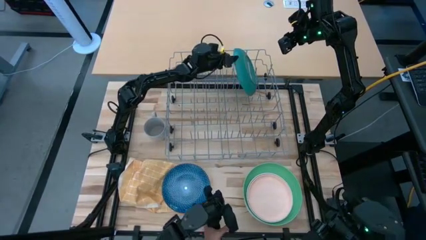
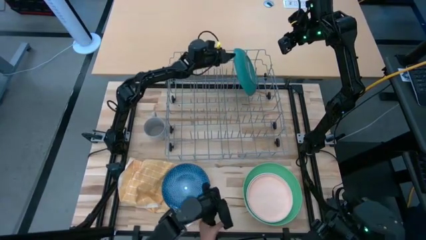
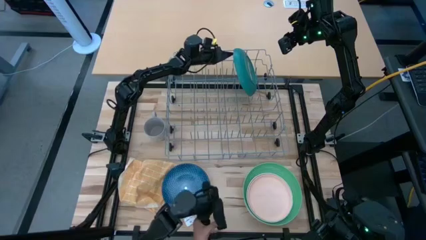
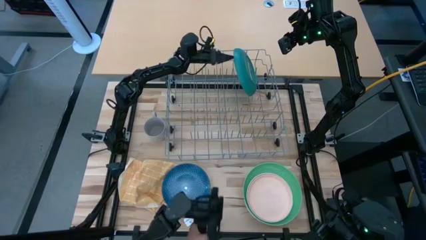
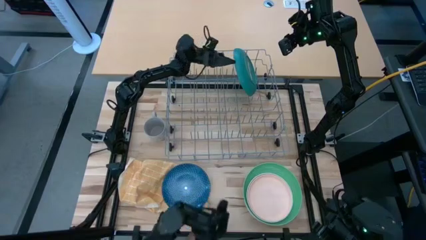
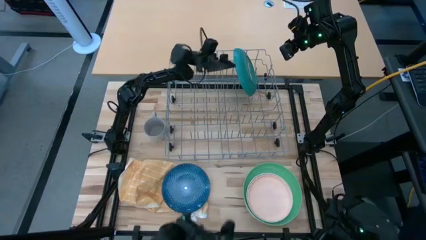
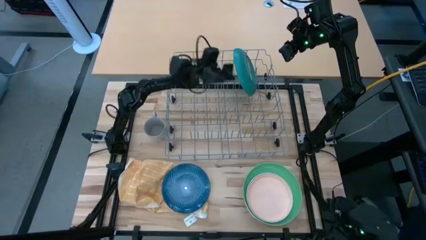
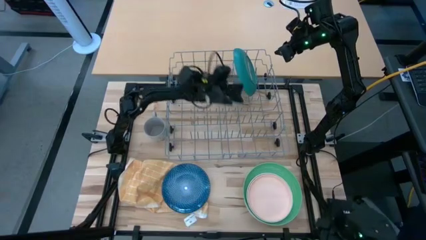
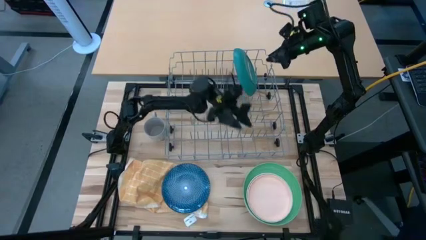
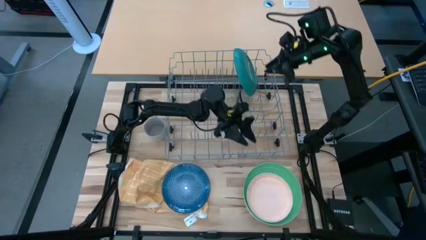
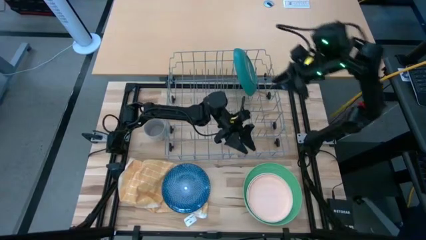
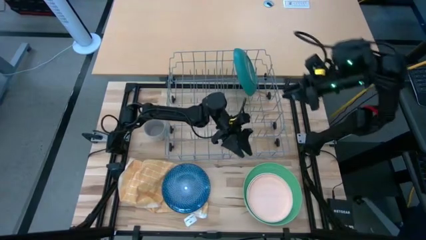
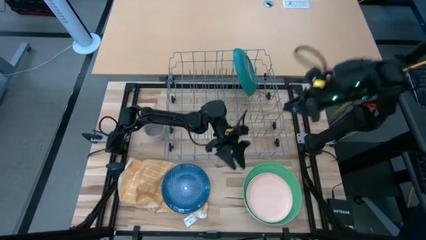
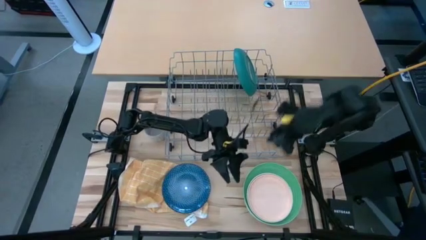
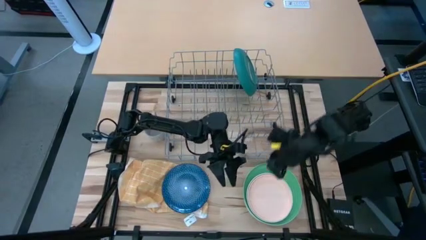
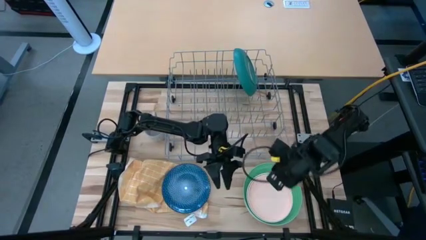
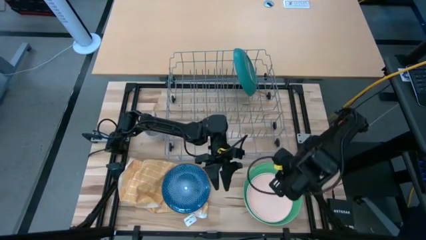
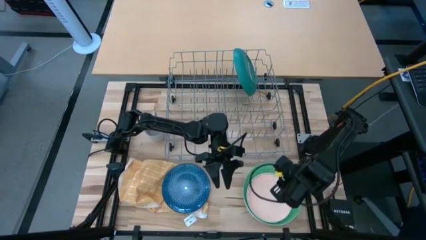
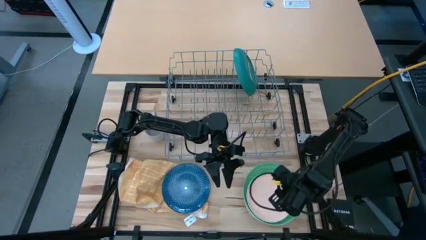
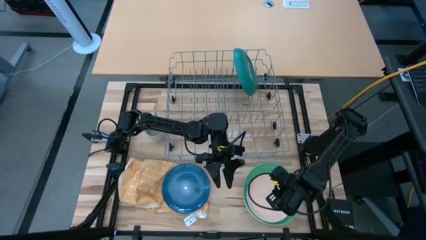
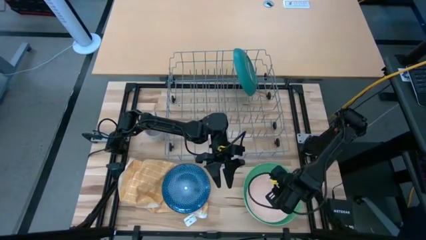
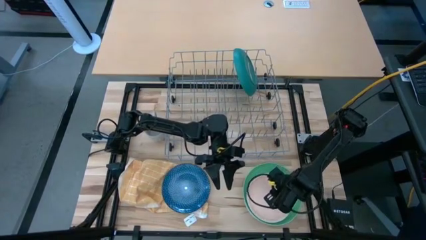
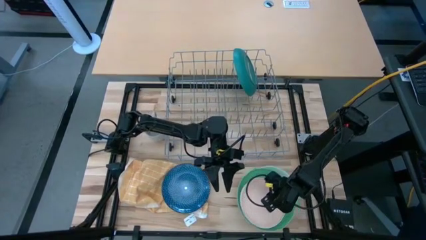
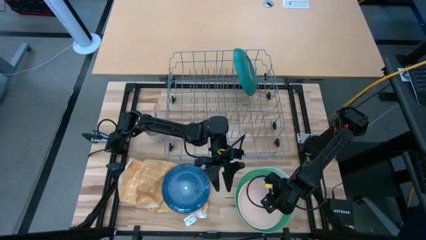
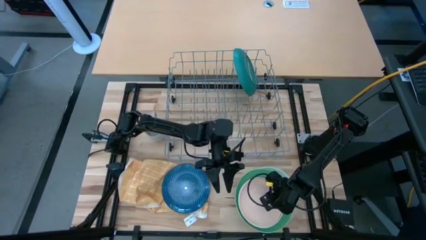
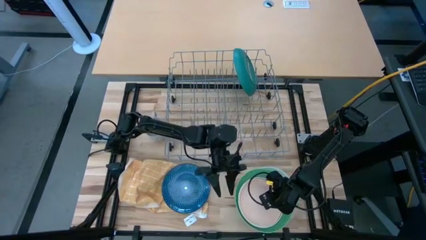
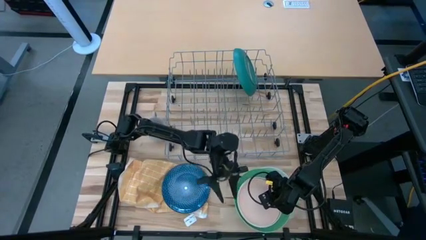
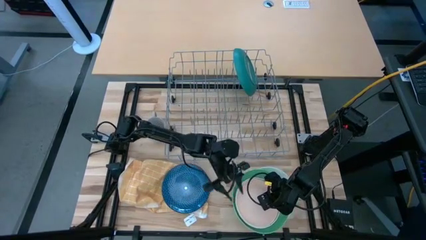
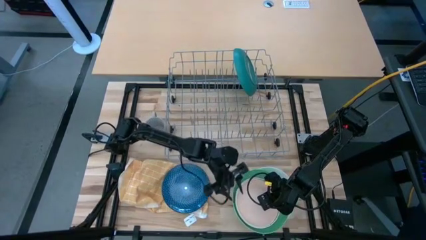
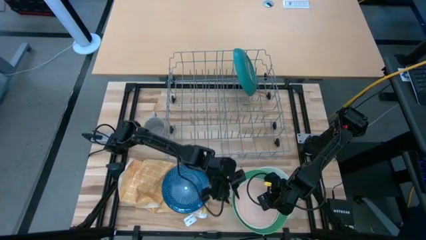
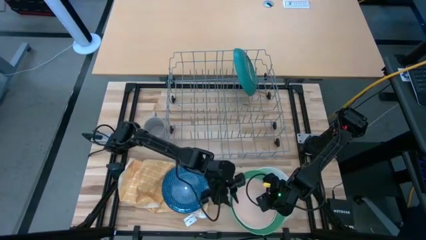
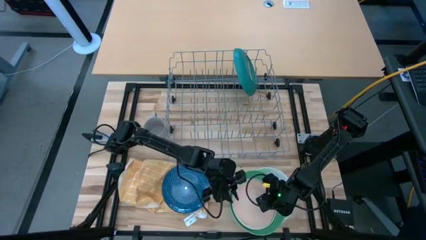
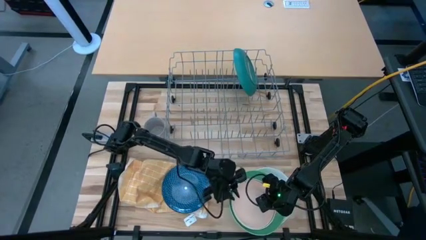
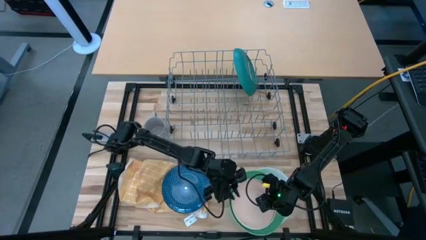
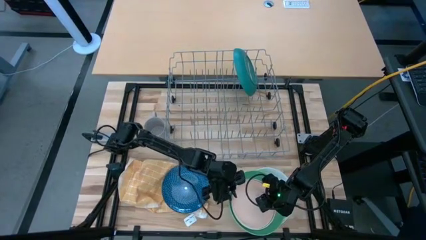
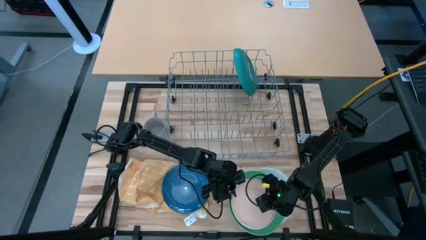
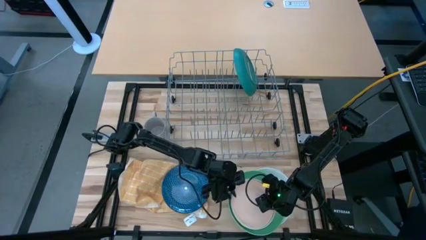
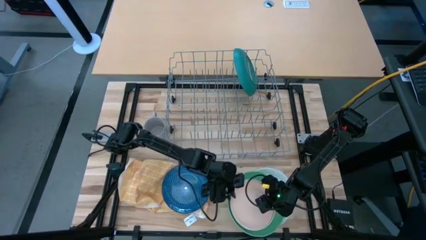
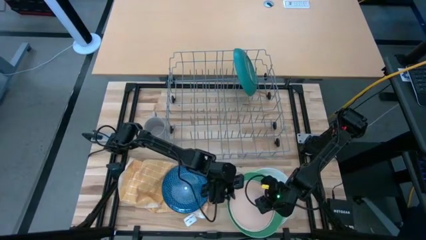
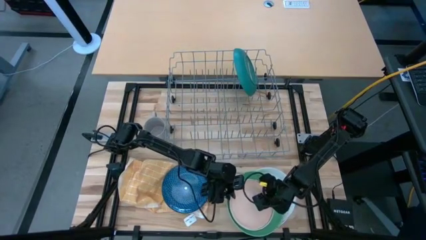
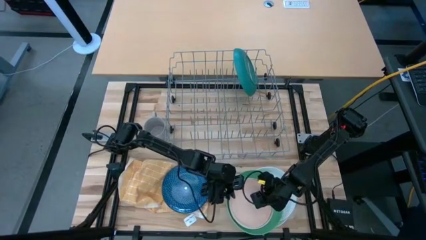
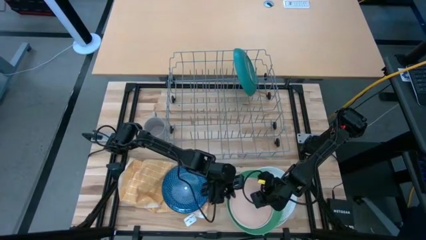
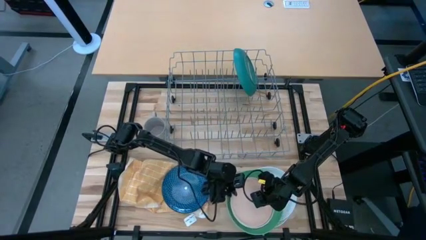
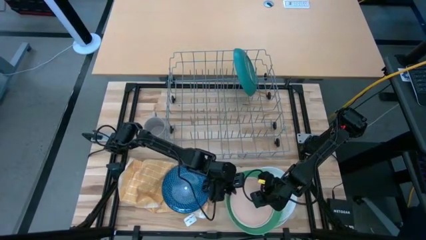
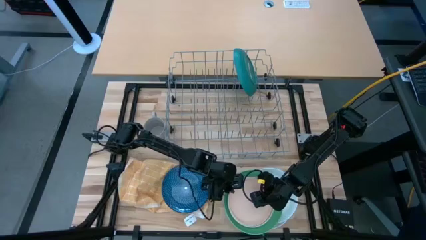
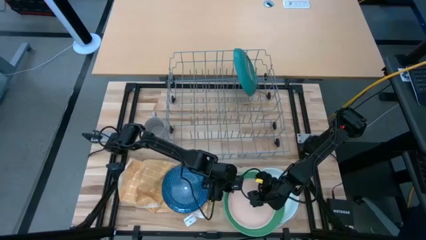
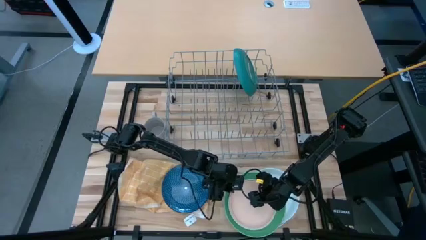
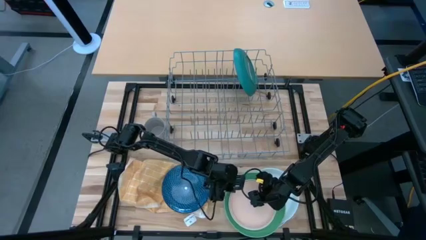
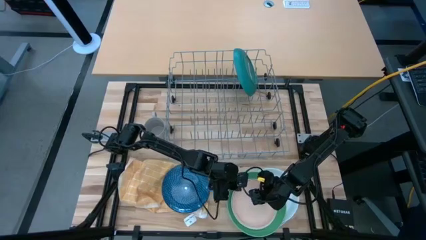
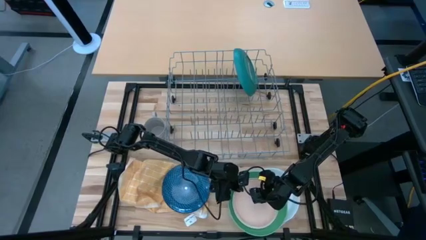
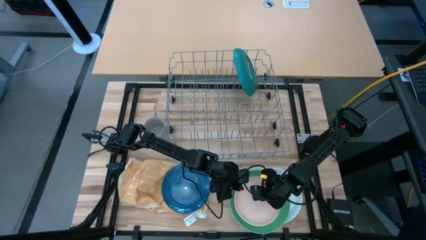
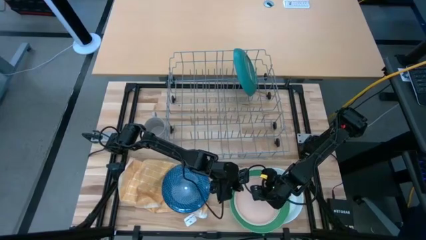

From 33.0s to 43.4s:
Task: Sort dishes
Move the stacked plates to the bottom left of the table

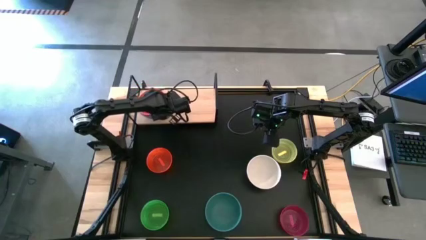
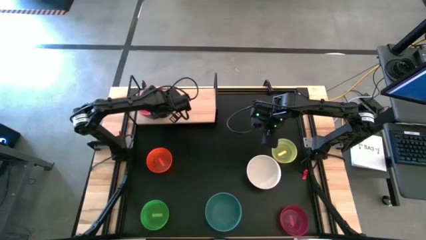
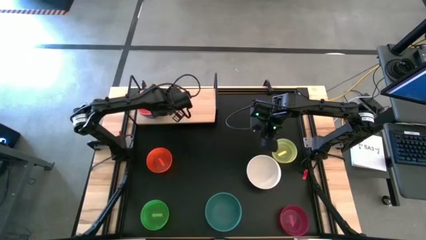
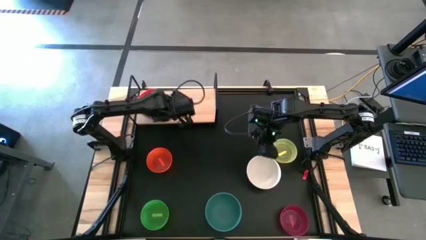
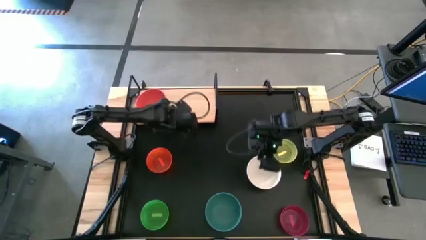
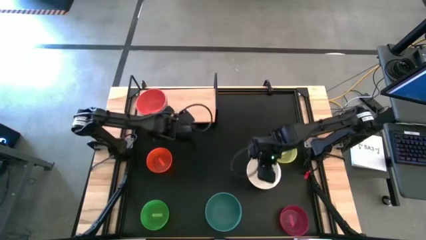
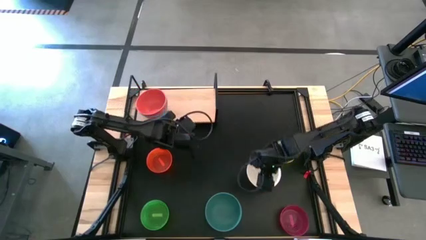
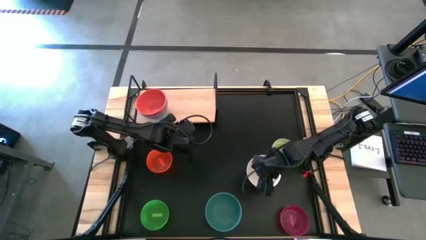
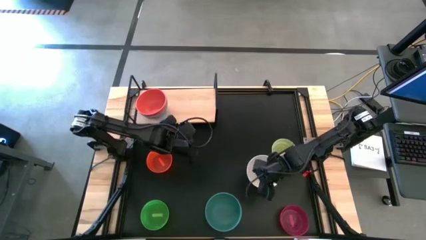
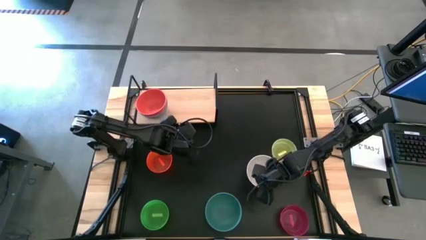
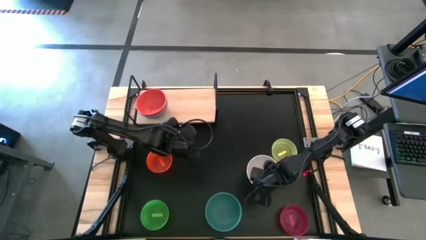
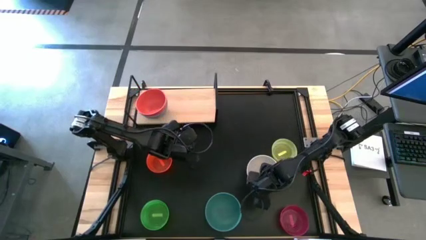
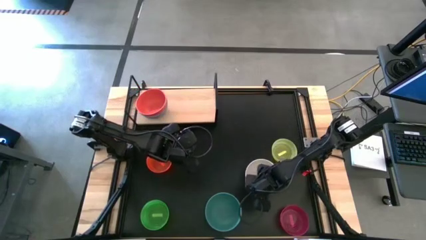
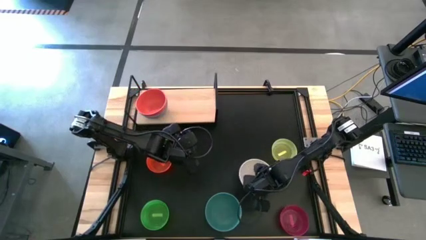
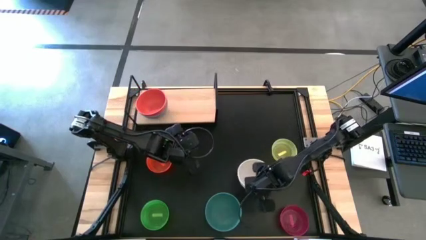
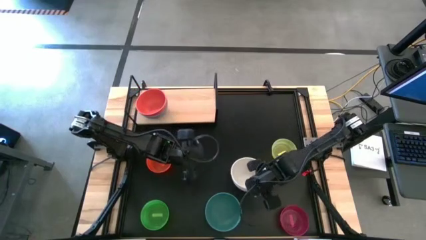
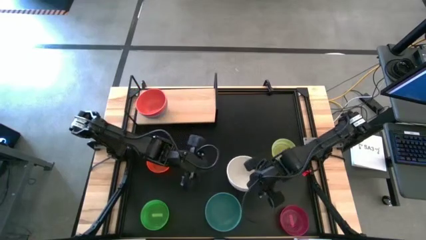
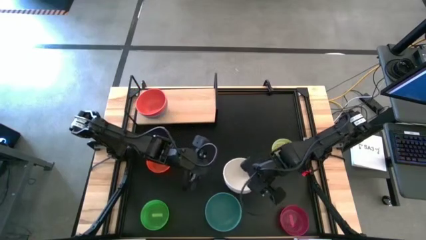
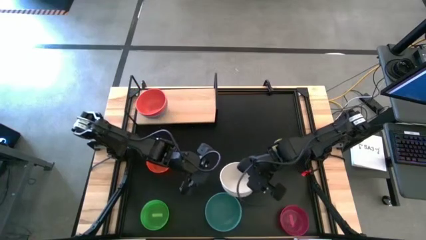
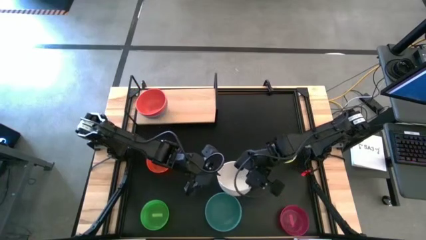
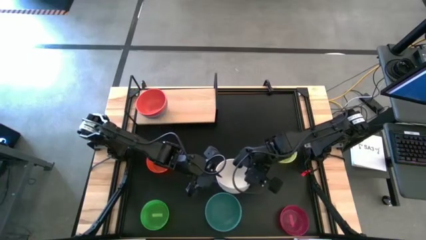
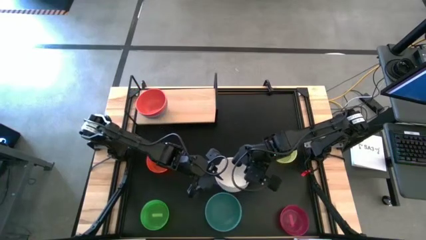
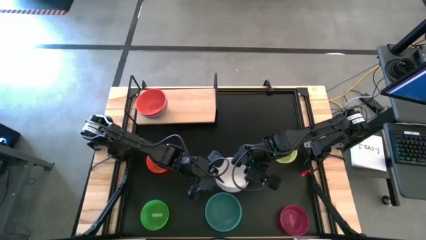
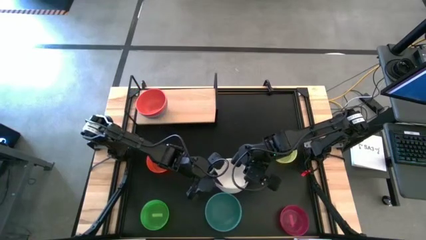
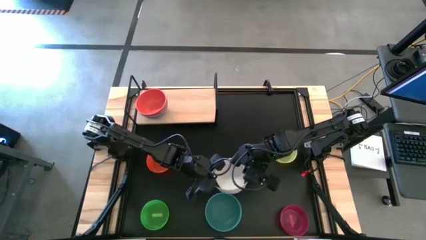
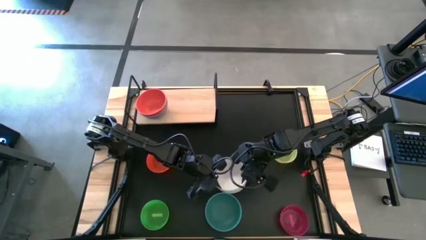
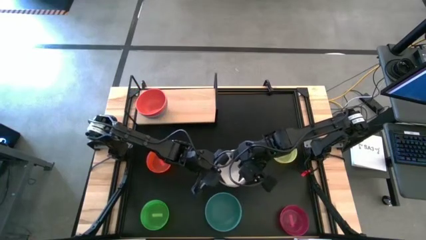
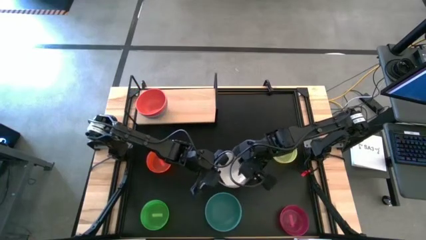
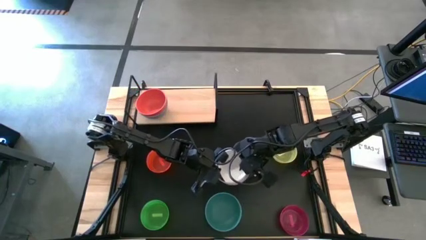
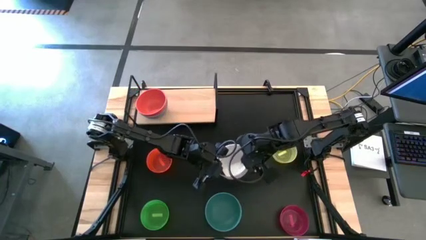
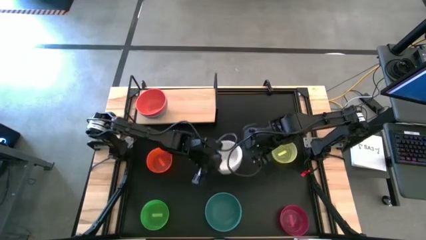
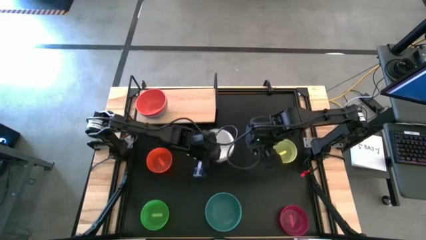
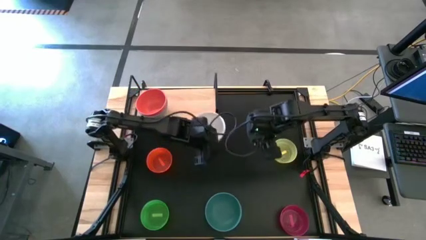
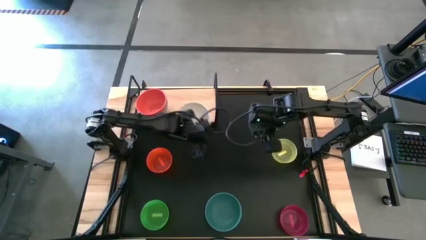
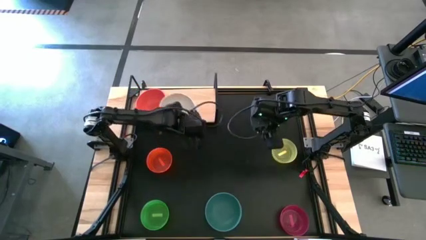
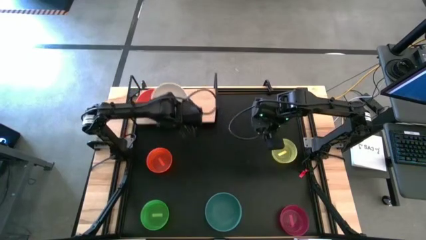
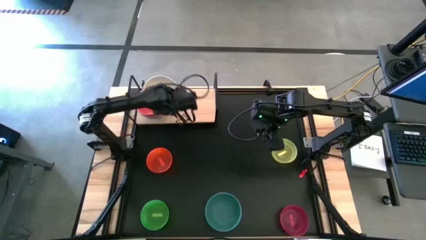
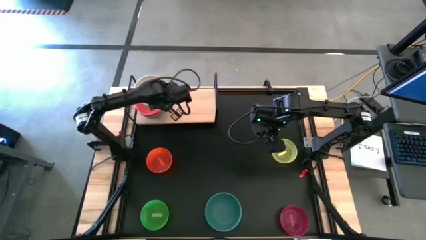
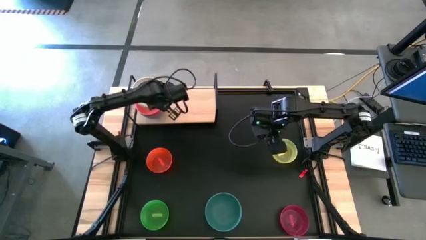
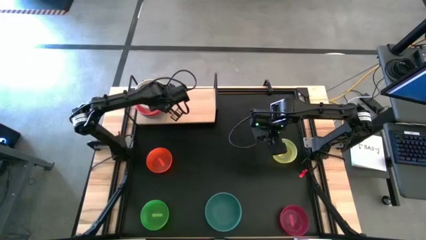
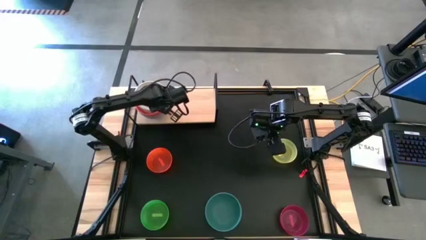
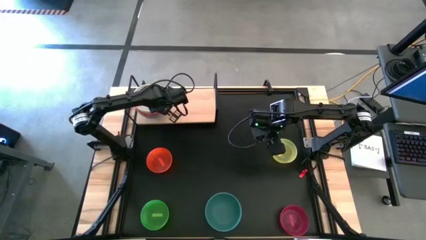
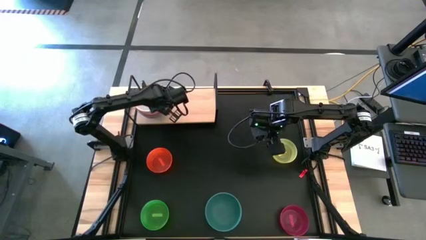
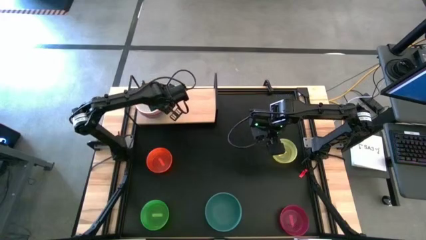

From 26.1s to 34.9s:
Task: Place and stack bowls onto a shelf
Stack the white bowl on top of the orange bowl on the shelf
